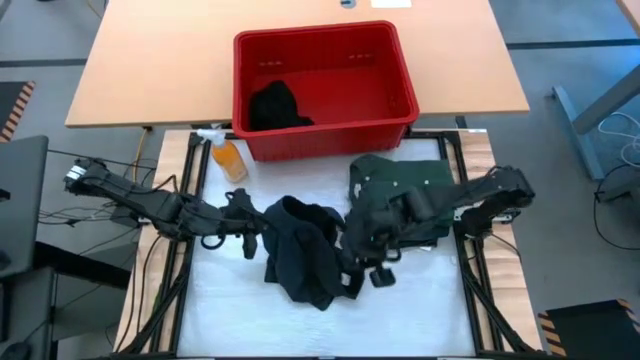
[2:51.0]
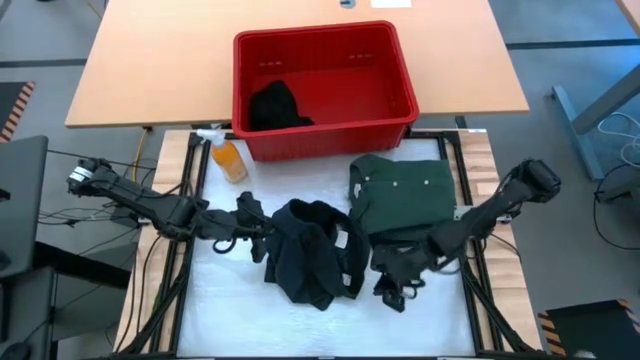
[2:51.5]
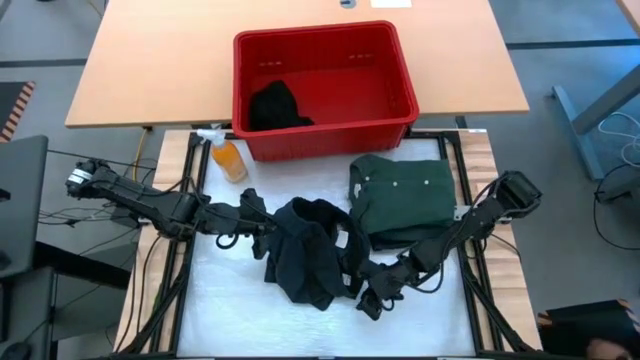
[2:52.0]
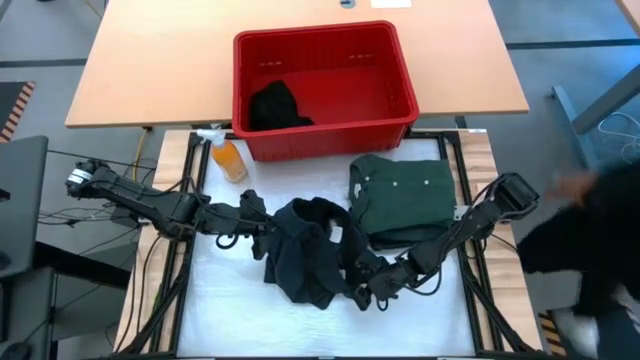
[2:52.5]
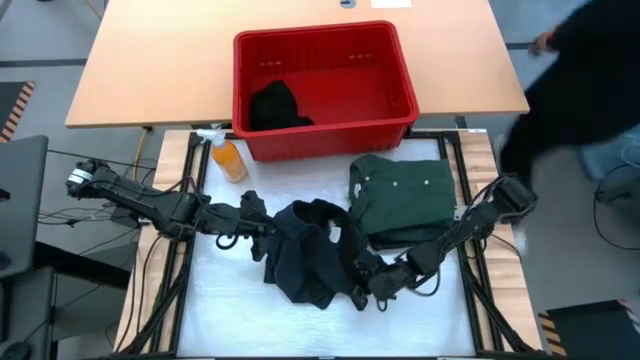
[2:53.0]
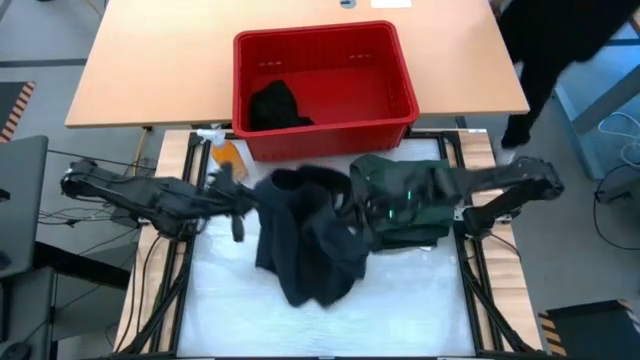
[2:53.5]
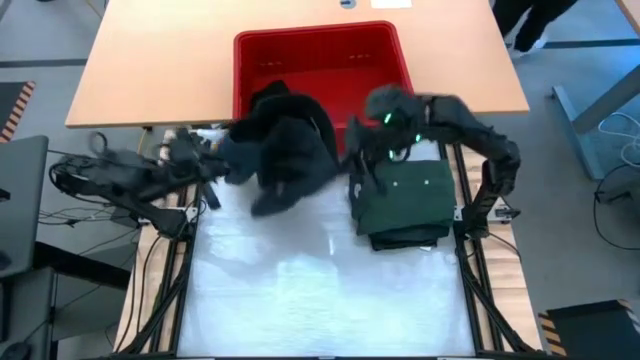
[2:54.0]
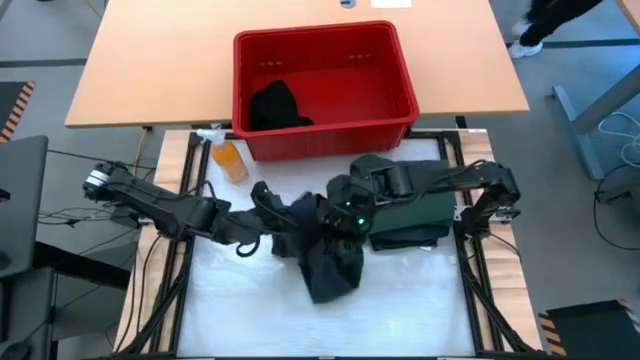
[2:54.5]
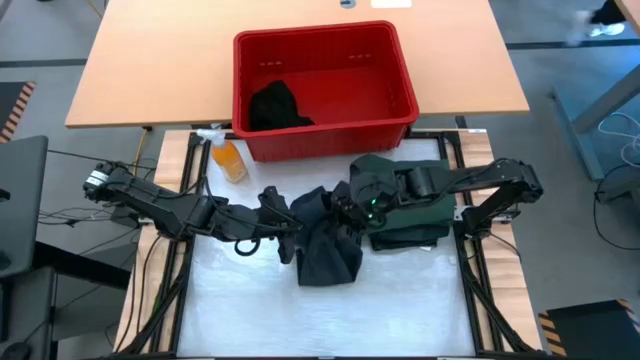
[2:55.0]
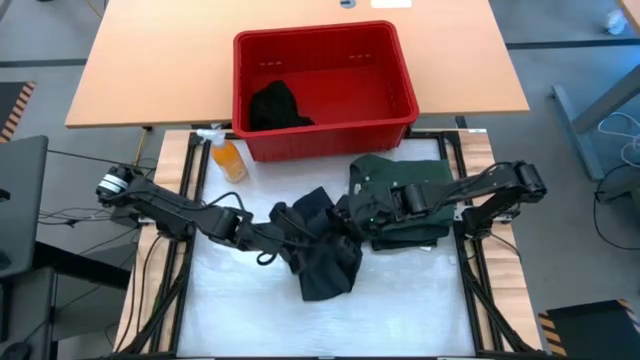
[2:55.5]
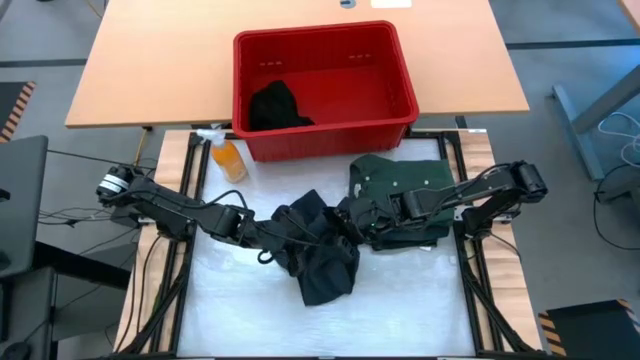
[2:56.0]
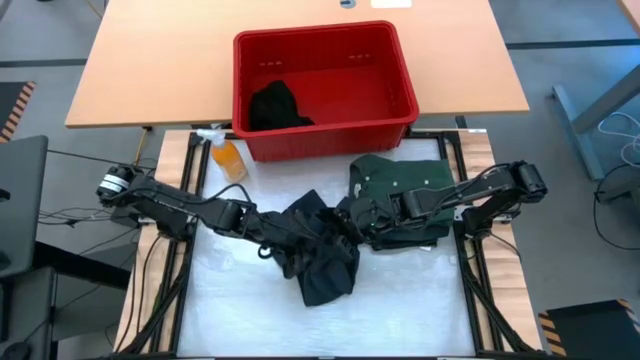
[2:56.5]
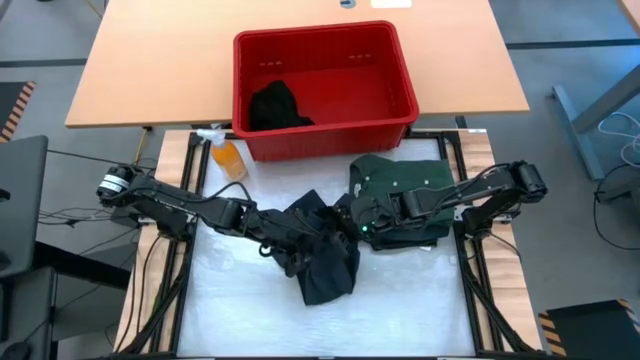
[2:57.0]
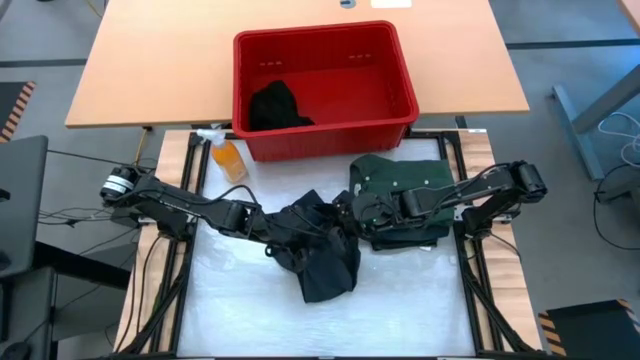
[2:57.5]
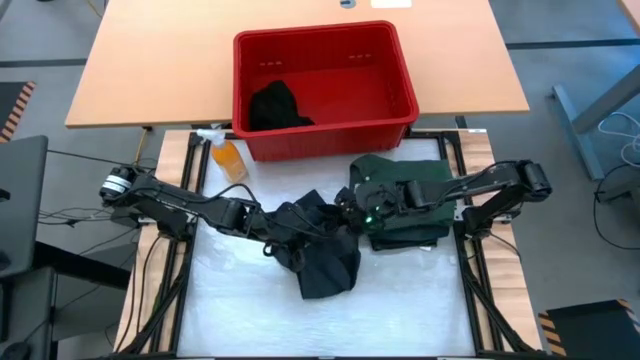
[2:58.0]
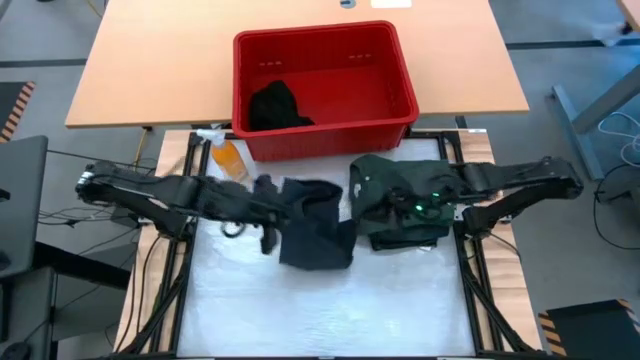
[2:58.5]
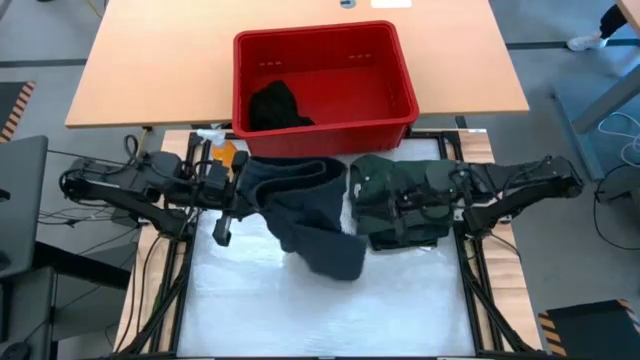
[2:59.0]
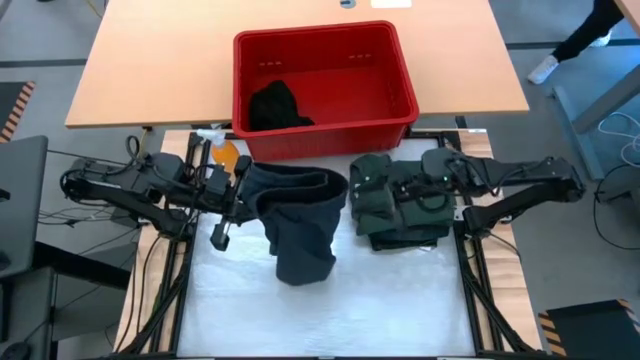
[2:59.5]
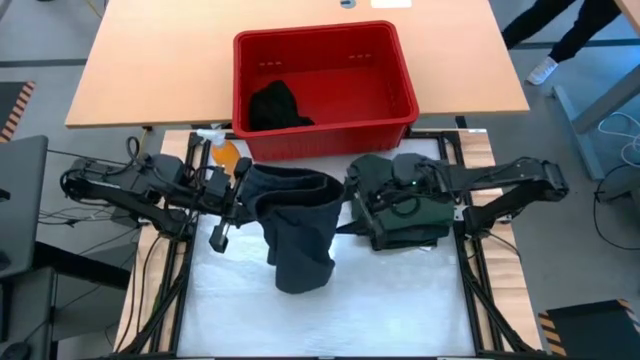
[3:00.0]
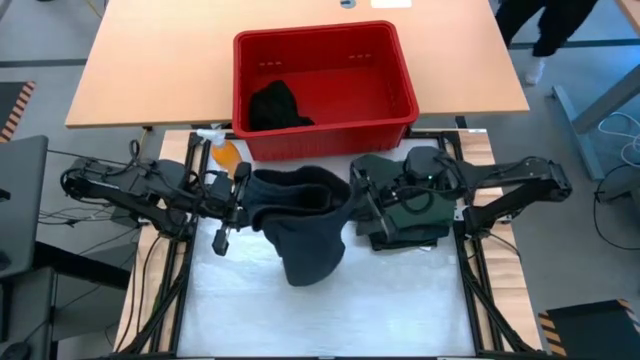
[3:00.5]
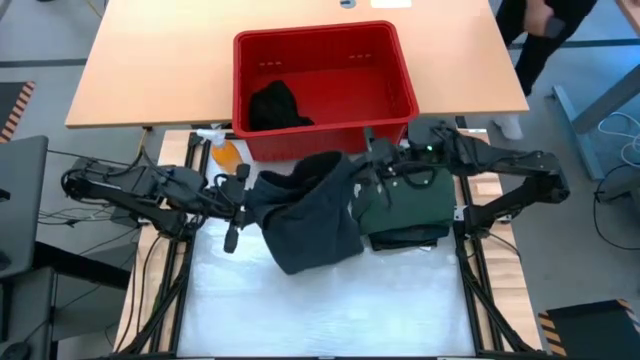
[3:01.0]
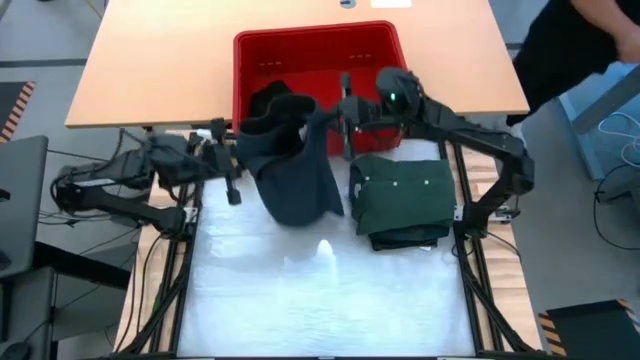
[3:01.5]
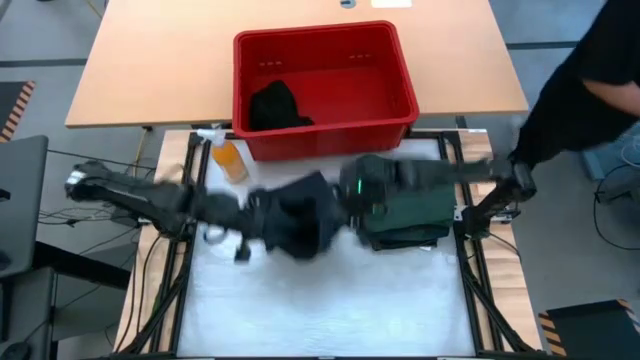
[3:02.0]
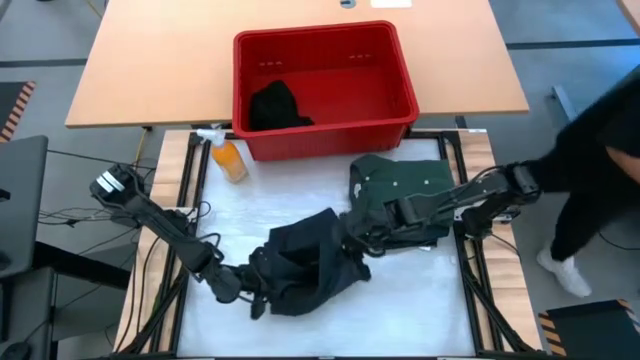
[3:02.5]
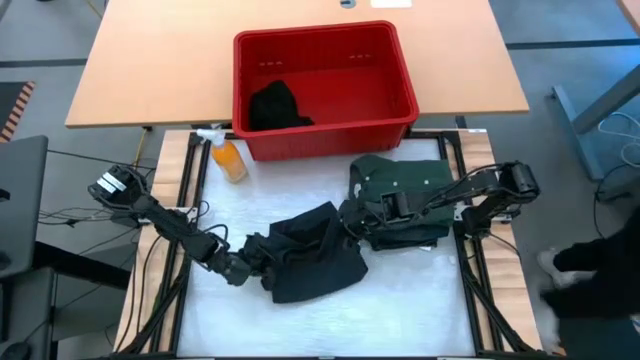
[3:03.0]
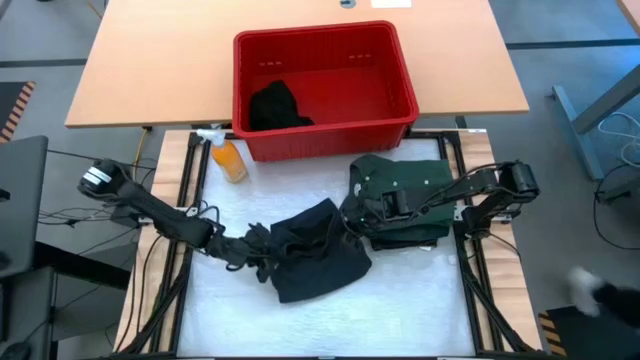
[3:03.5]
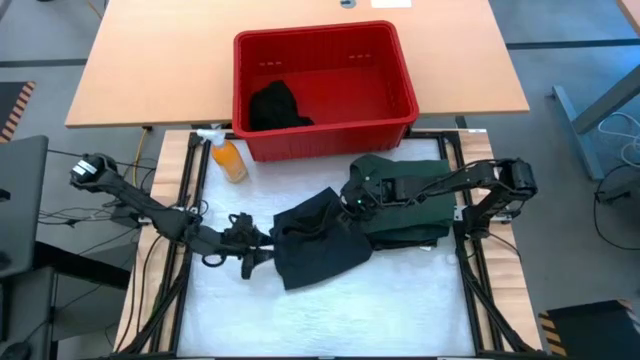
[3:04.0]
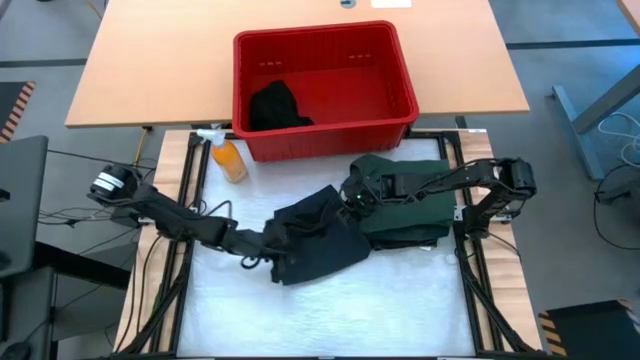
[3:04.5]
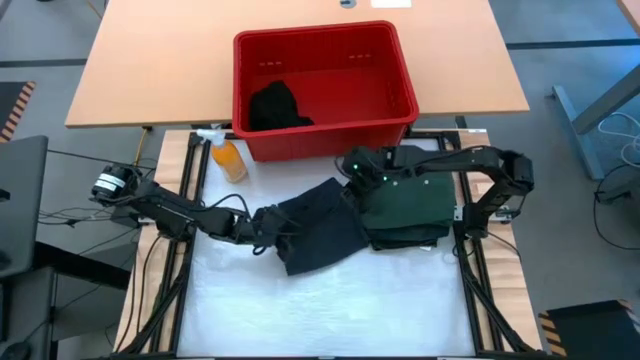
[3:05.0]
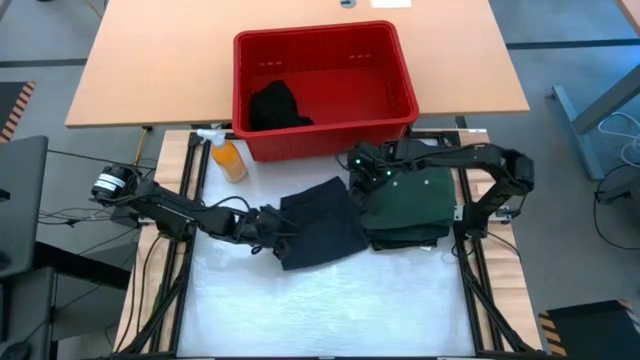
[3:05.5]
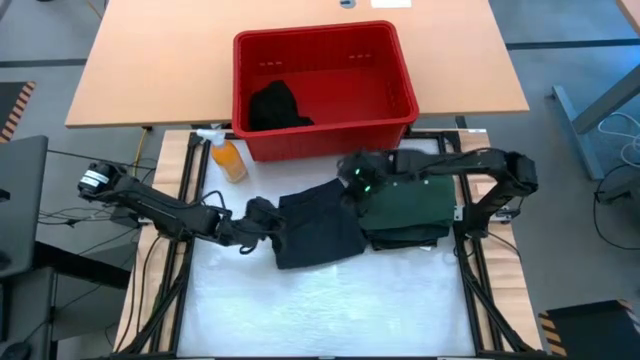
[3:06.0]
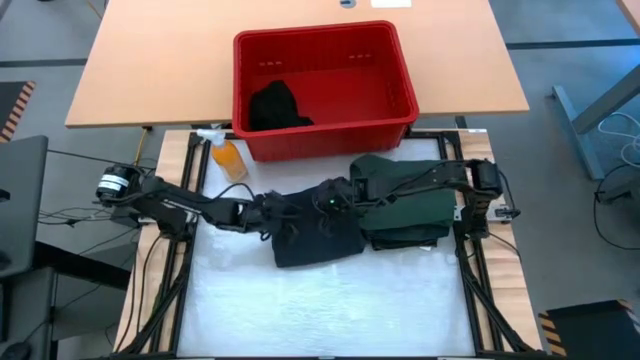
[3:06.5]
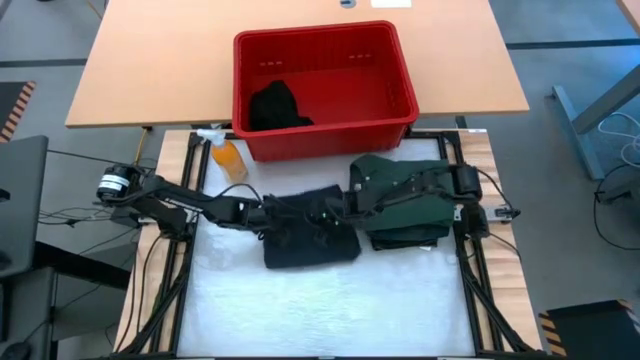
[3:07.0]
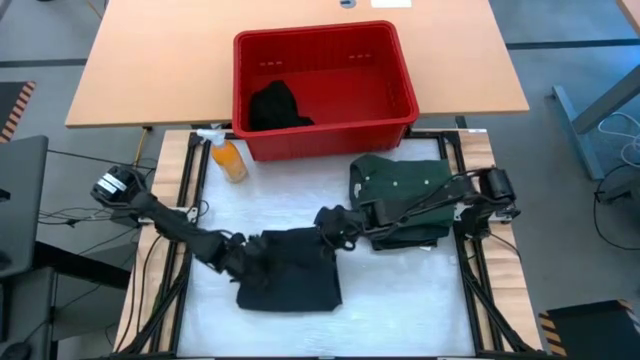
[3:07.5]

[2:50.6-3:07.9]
Task: Fold Laundry from Bin
Fold the black short

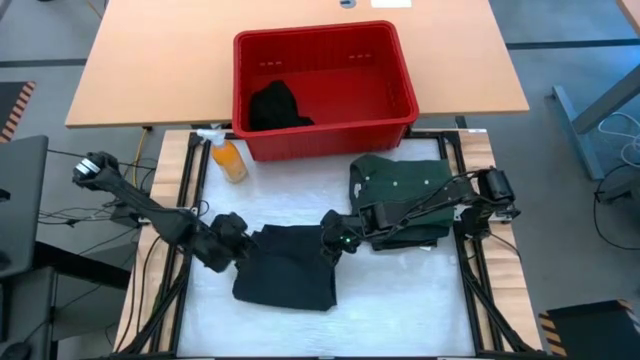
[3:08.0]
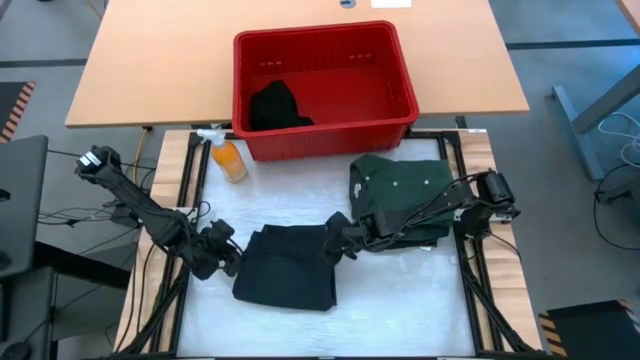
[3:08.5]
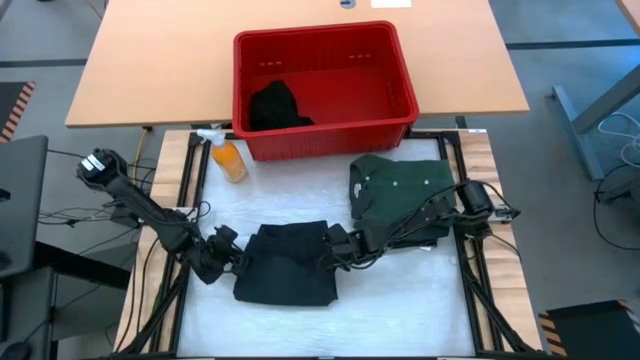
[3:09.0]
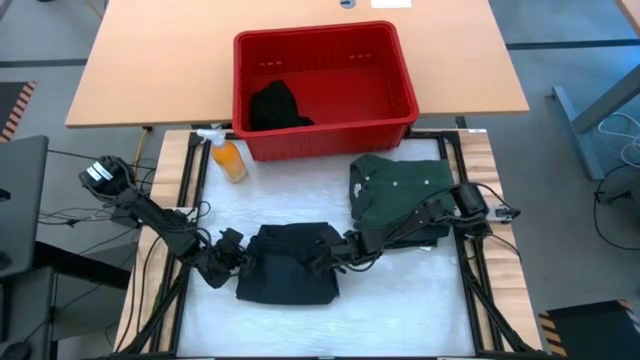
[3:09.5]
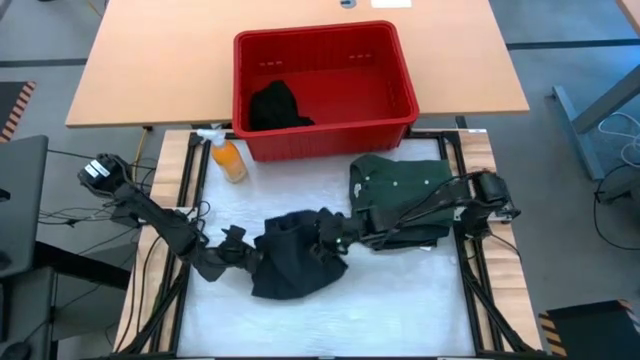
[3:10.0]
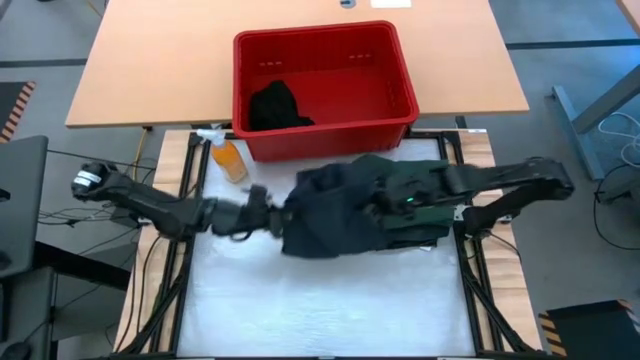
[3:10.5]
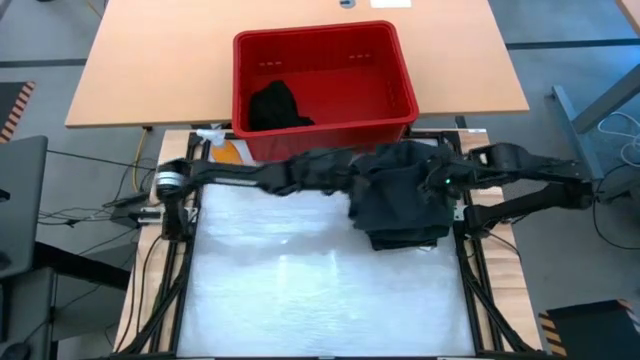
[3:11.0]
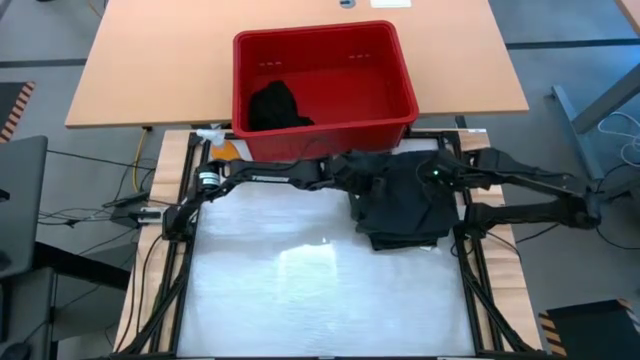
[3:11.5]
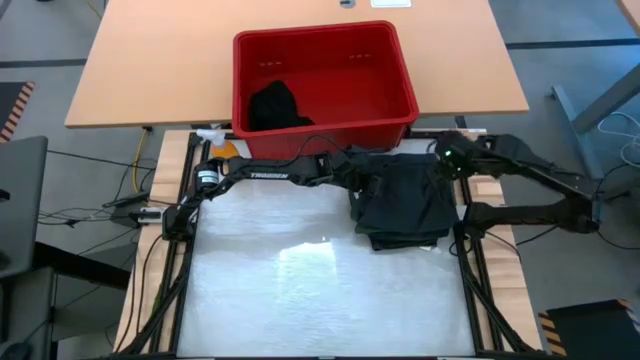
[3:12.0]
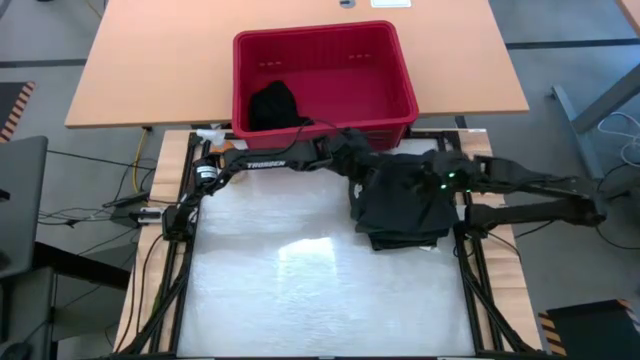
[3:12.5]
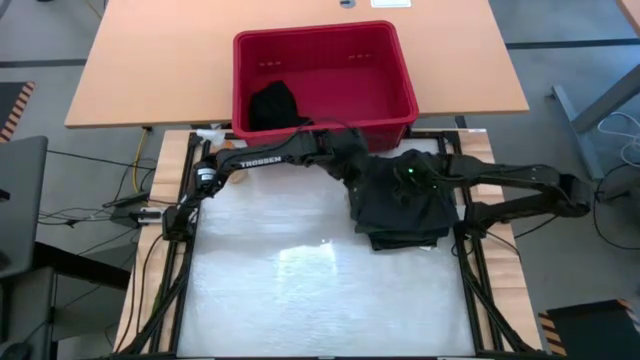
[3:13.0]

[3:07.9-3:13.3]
Stack the black short on top of the green polo shirt
